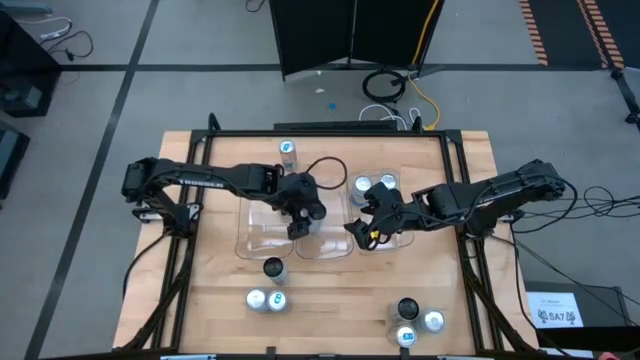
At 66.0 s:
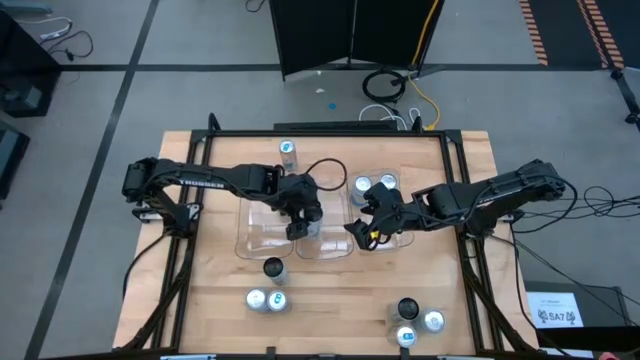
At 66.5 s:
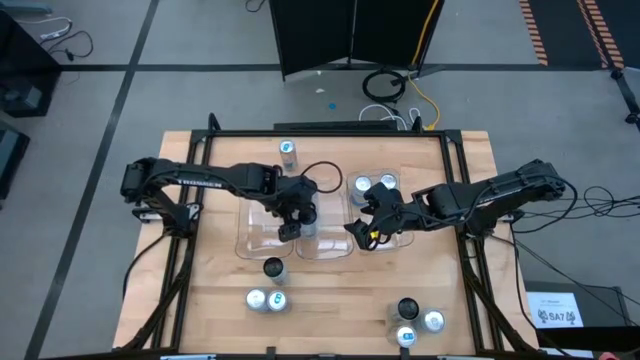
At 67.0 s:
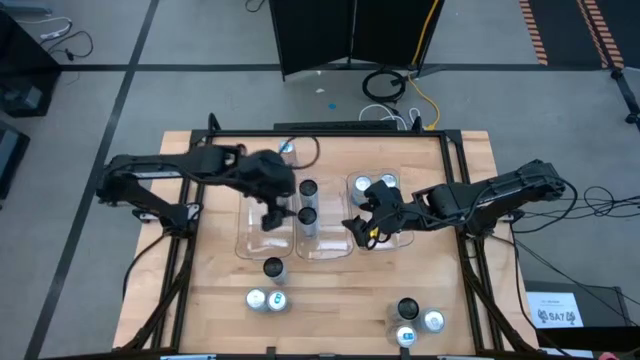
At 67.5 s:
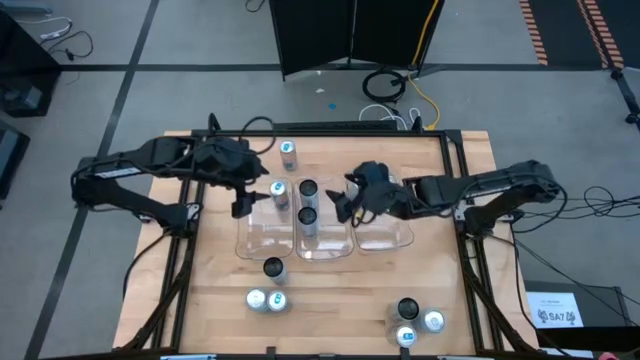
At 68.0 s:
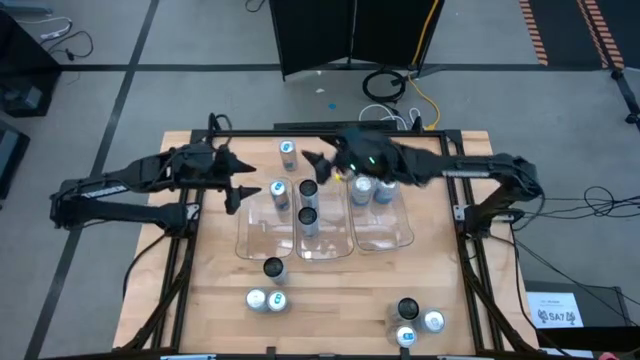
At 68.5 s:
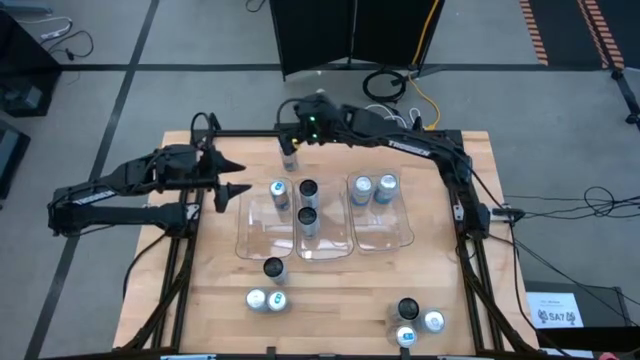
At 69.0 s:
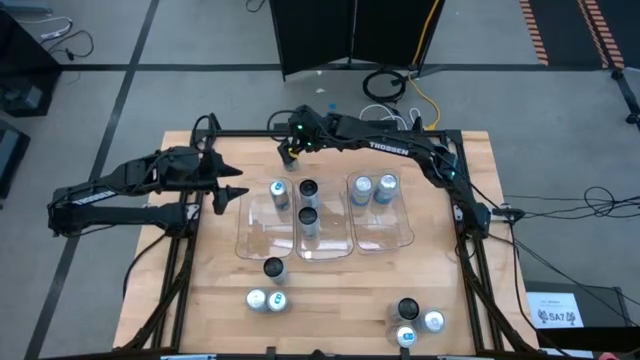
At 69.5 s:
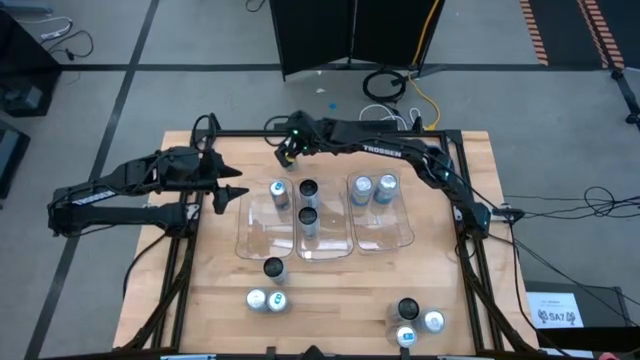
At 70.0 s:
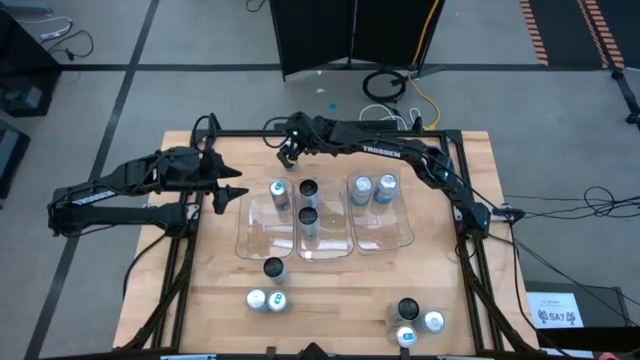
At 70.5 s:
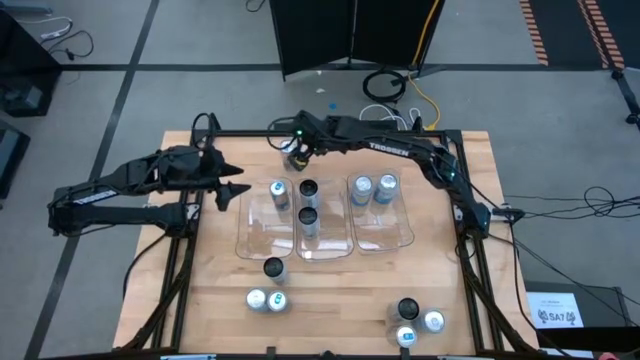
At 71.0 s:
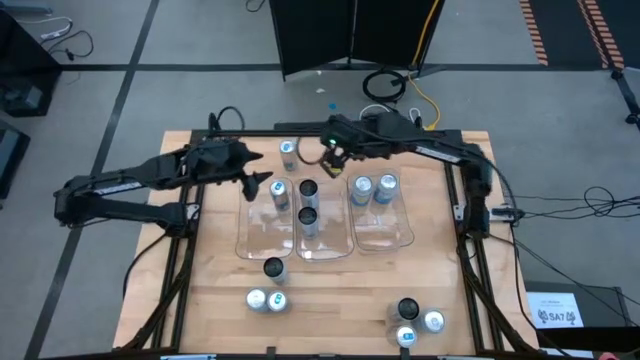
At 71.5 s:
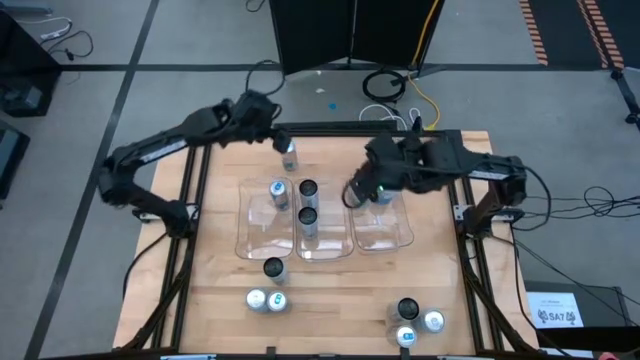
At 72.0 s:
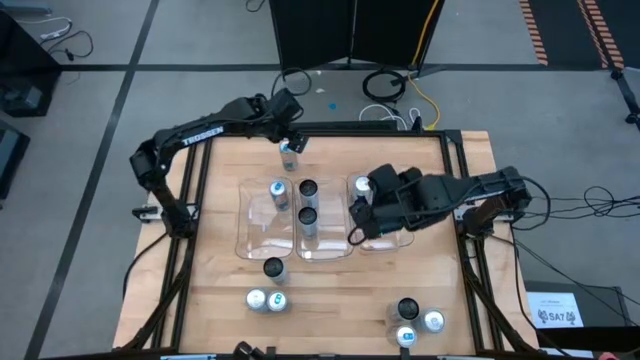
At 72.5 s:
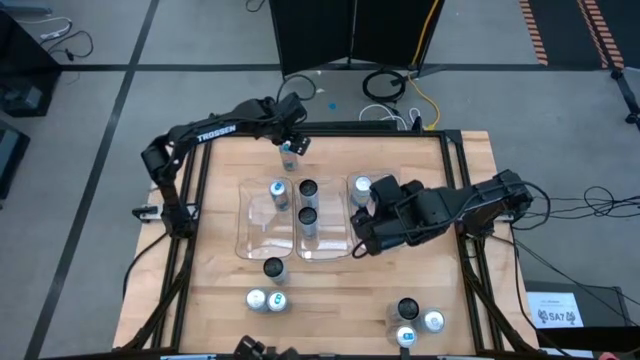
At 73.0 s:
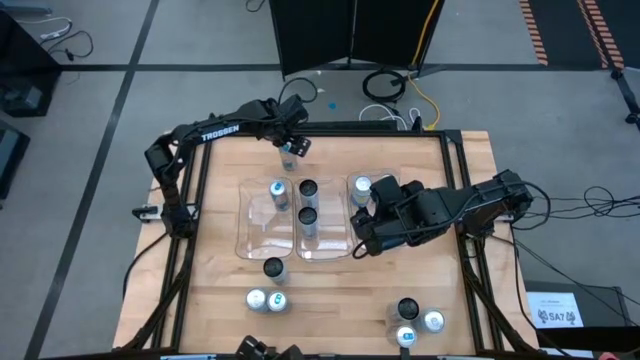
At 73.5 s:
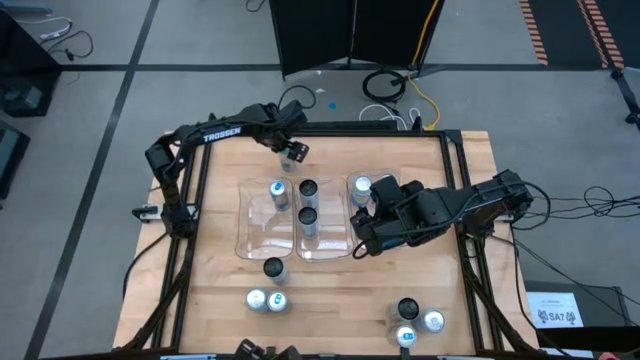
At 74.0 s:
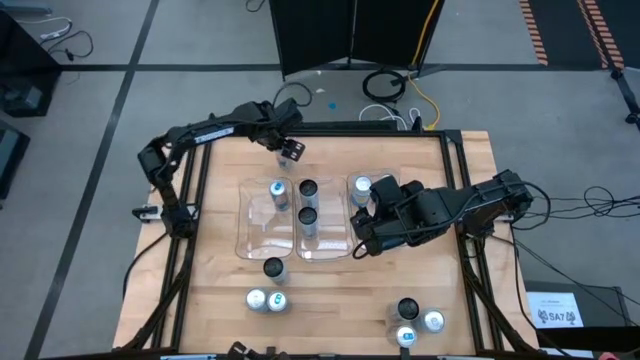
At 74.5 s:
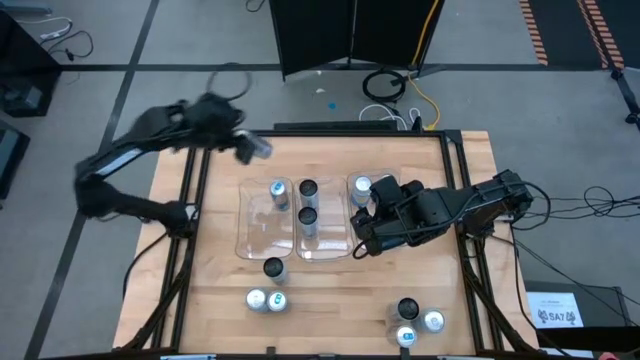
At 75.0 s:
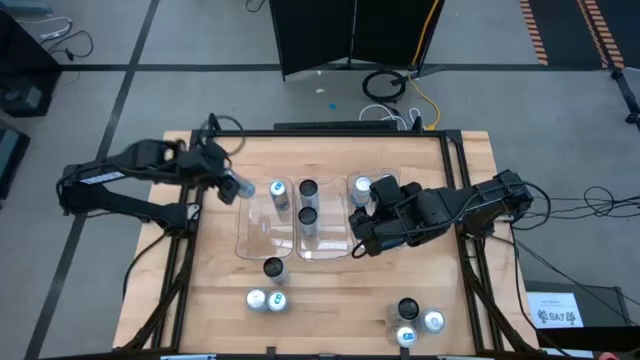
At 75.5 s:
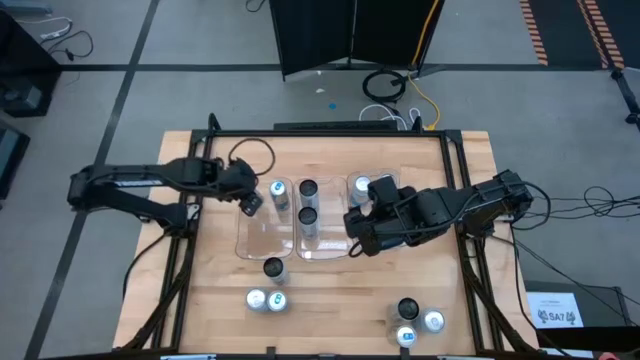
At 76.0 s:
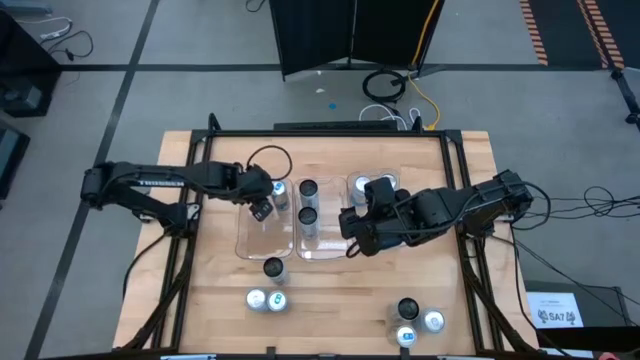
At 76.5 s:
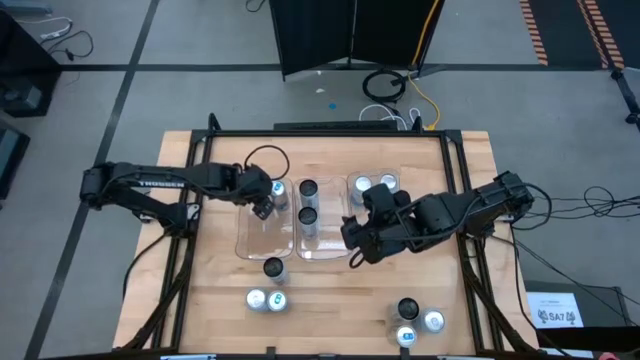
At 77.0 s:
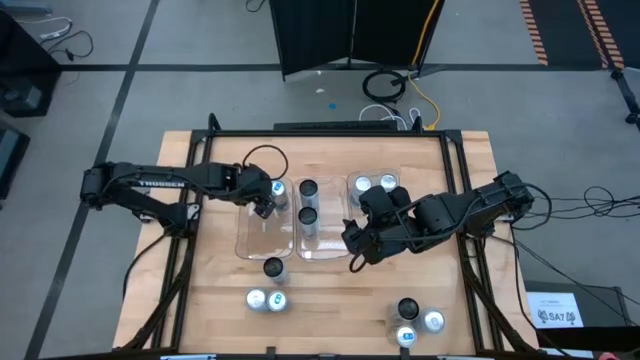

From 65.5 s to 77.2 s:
Task: Sort soda cans
Put the top right blue soda can into the left transparent bin

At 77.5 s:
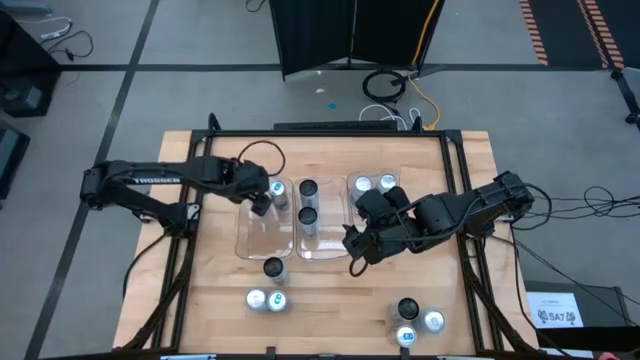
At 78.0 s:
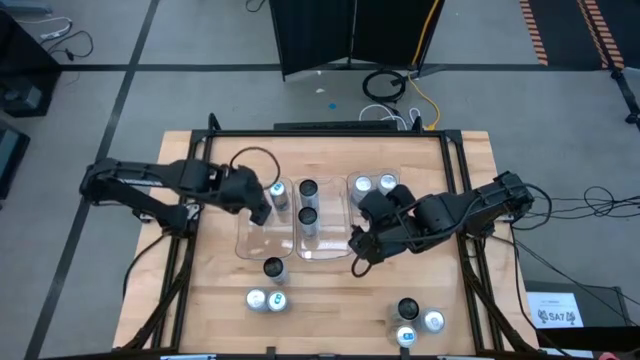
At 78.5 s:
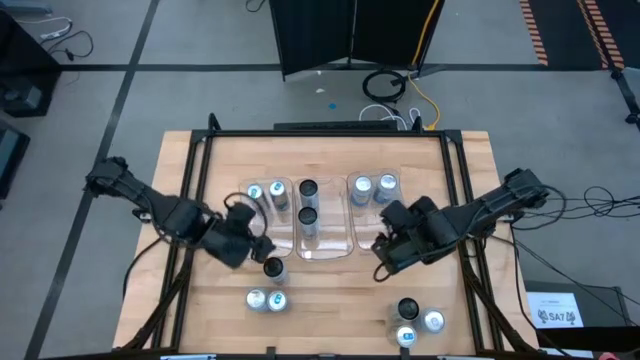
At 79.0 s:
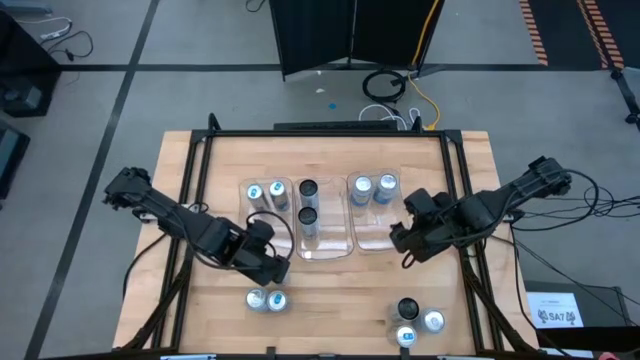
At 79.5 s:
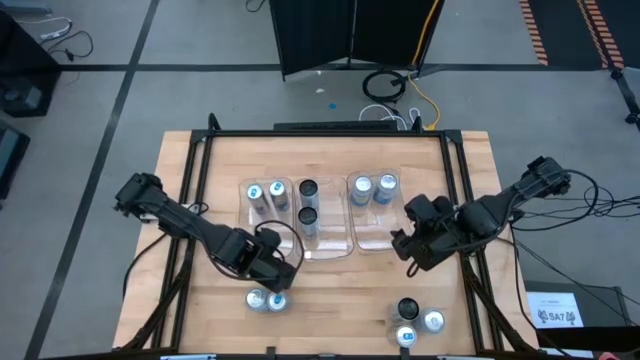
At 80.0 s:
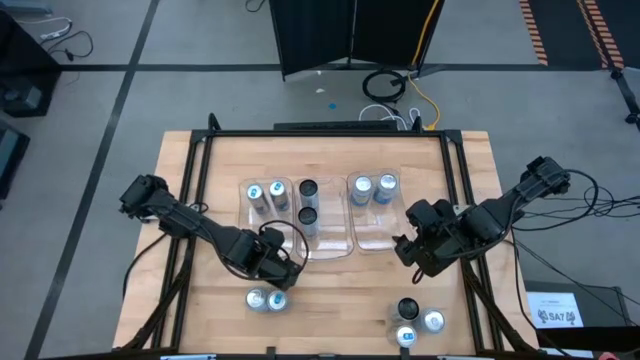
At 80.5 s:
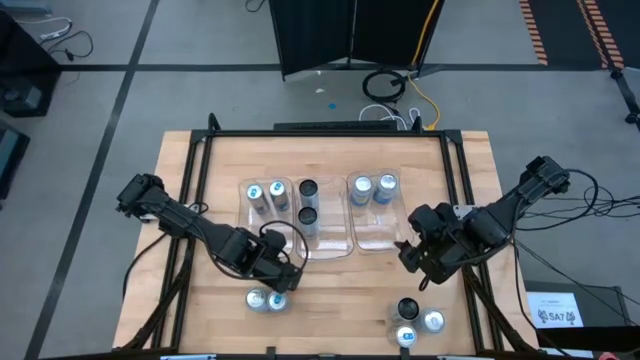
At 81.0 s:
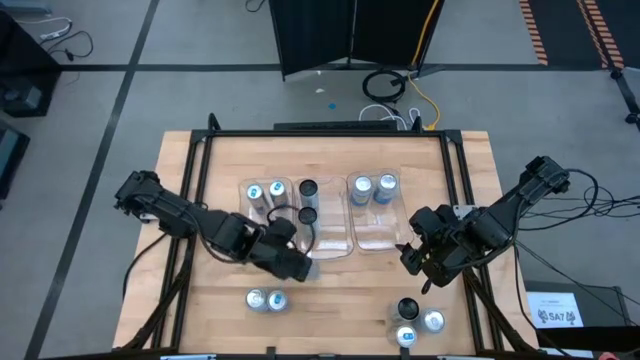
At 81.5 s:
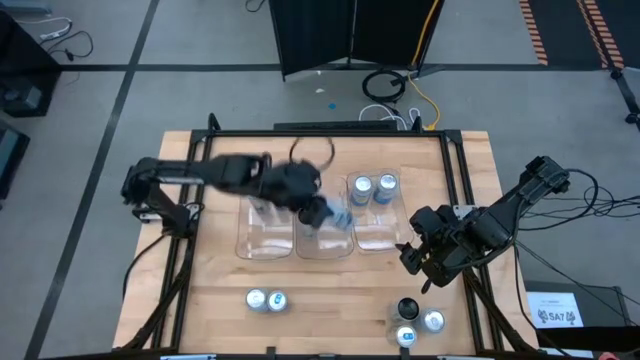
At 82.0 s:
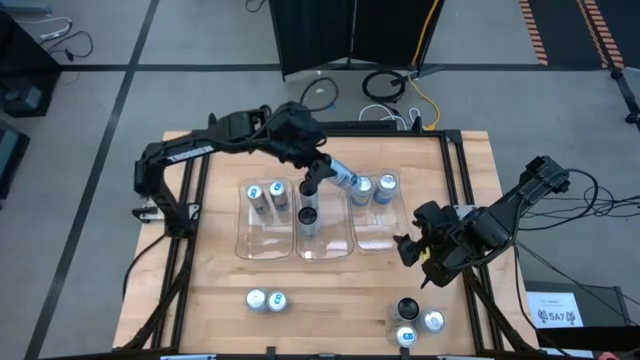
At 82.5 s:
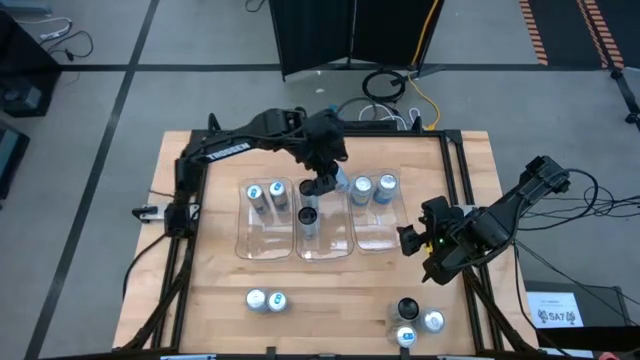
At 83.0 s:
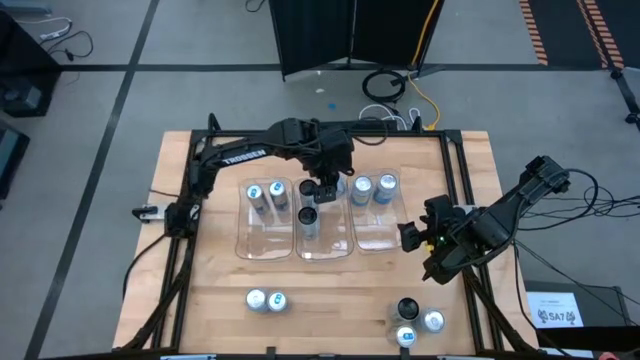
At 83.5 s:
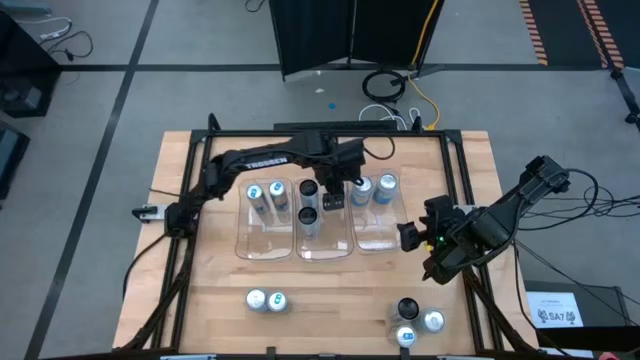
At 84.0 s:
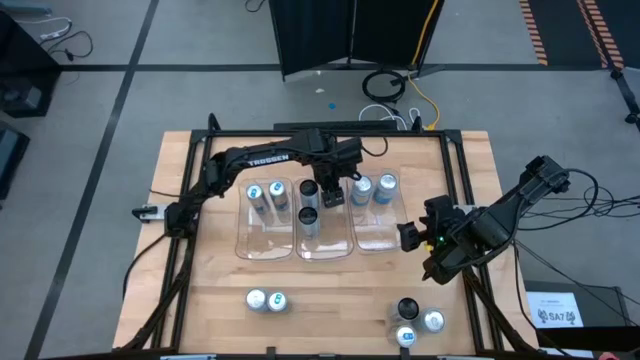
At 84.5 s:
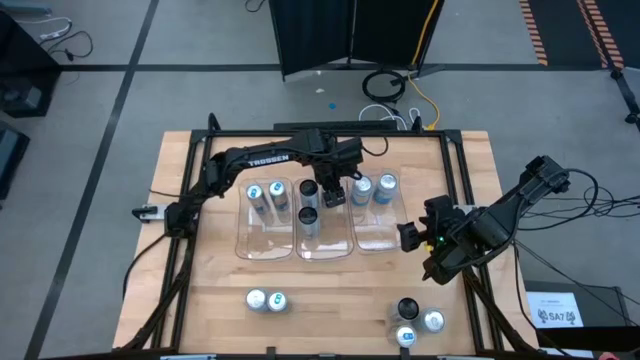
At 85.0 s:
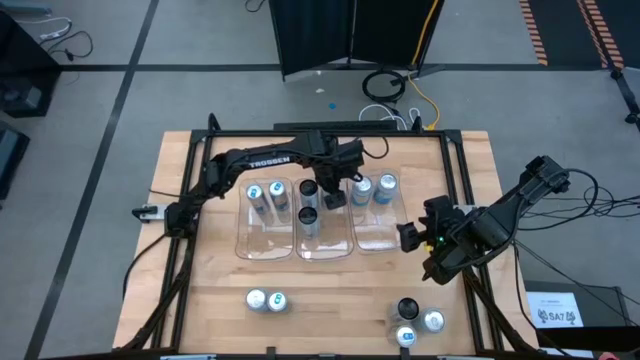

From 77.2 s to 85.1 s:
Put the top white-blue soda can into the middle transparent bin

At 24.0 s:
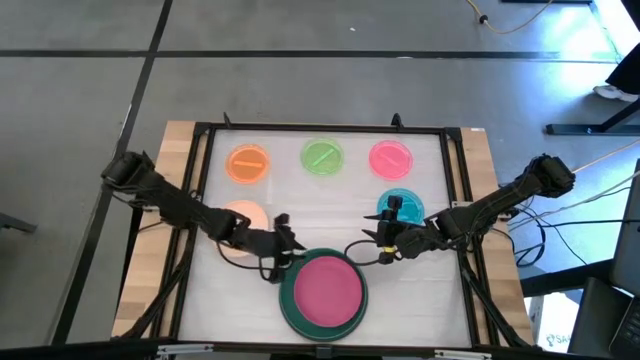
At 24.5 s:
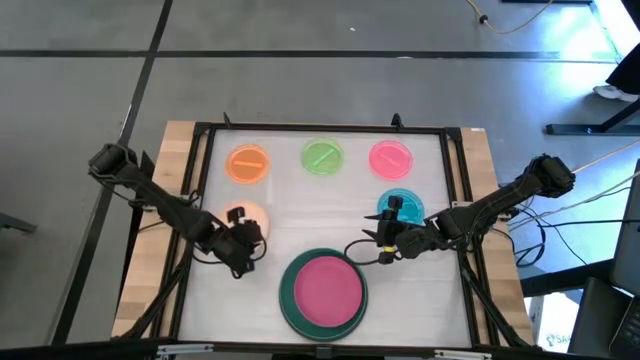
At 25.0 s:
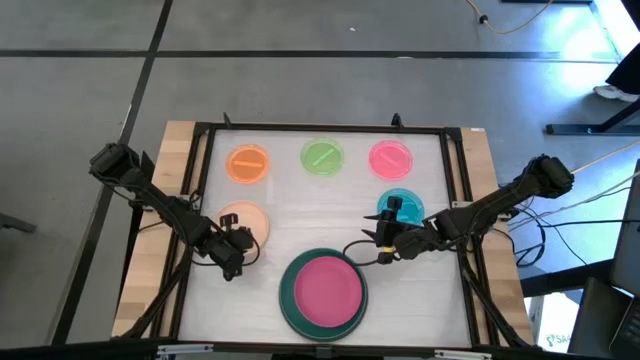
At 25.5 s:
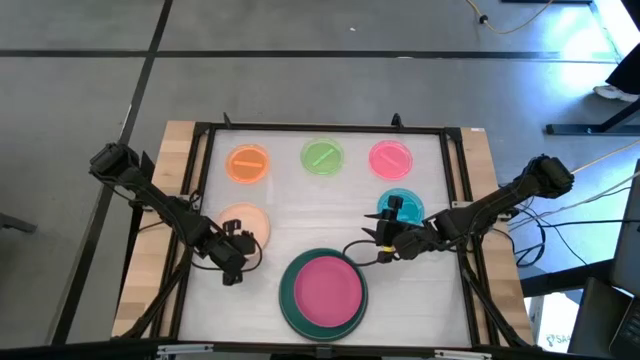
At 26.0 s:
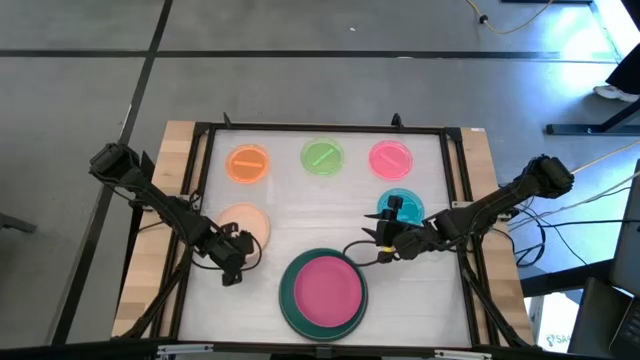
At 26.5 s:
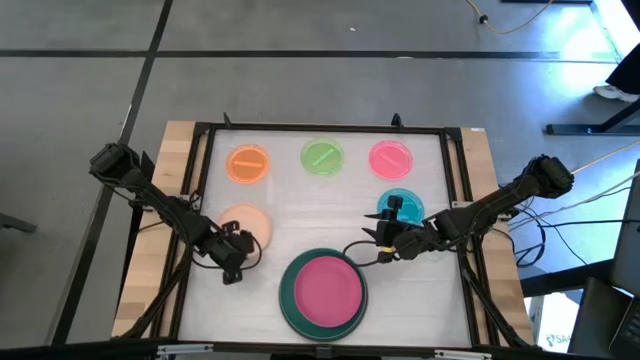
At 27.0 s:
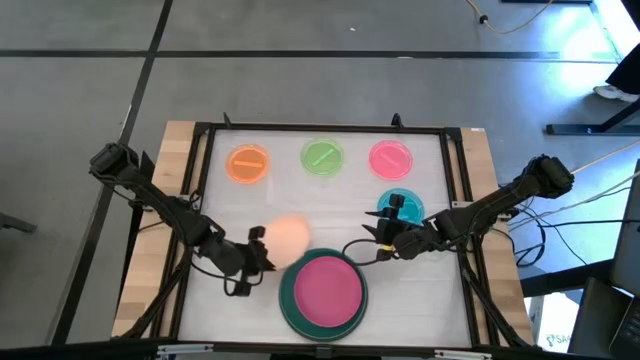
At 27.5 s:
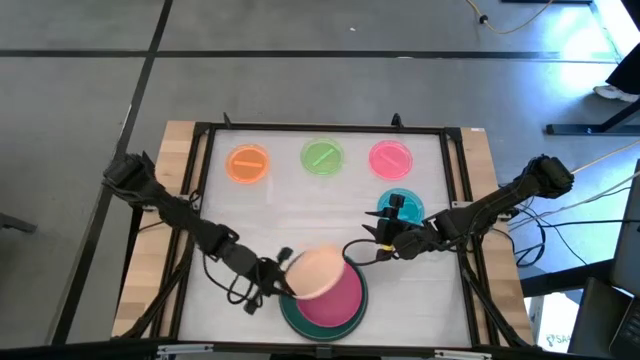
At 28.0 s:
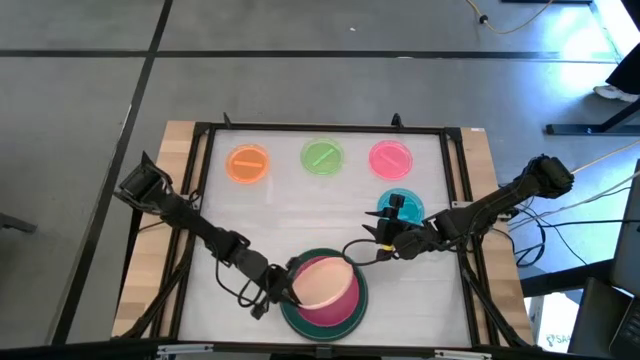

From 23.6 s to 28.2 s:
Task: Stack plastic plates
Stack the orange plate on top of the pink plate
